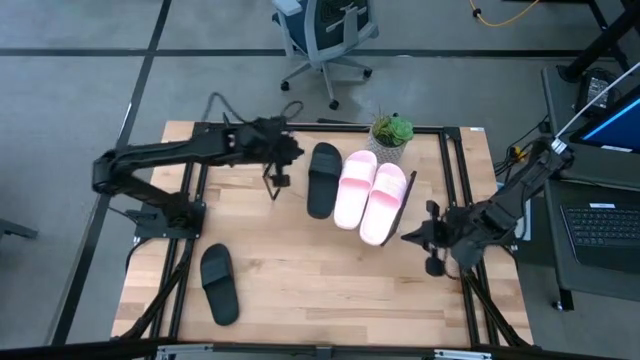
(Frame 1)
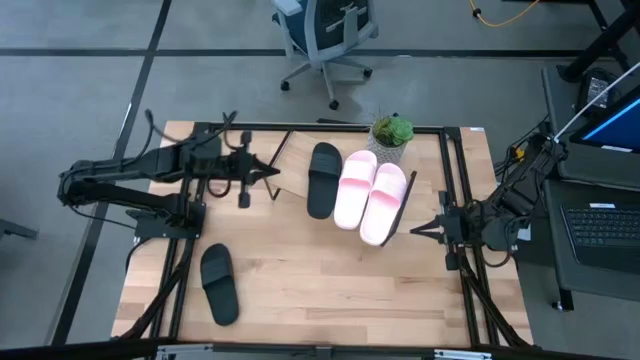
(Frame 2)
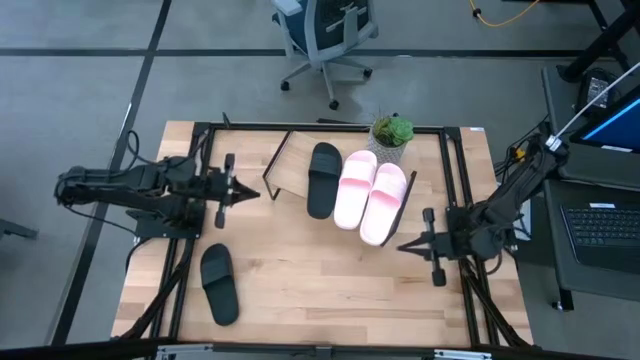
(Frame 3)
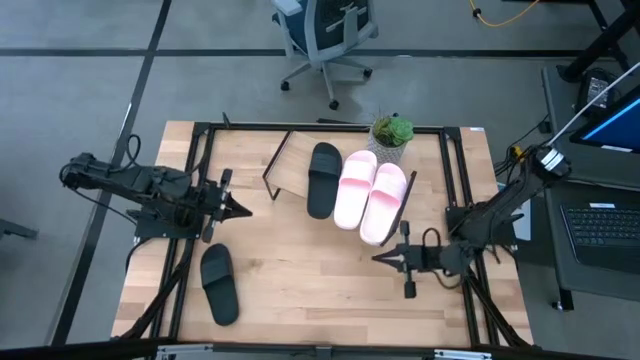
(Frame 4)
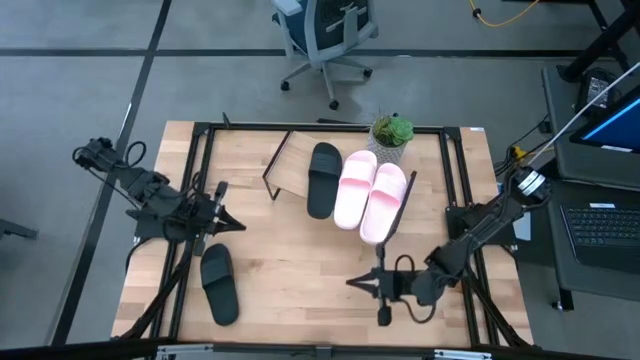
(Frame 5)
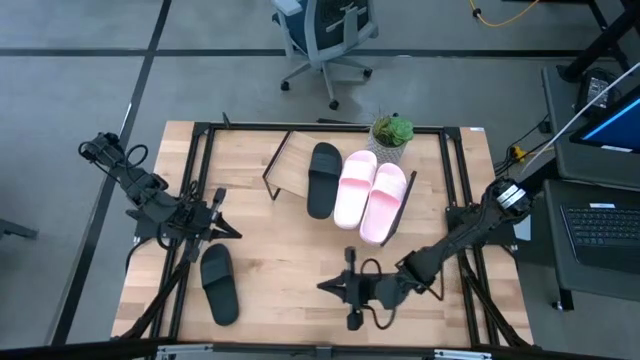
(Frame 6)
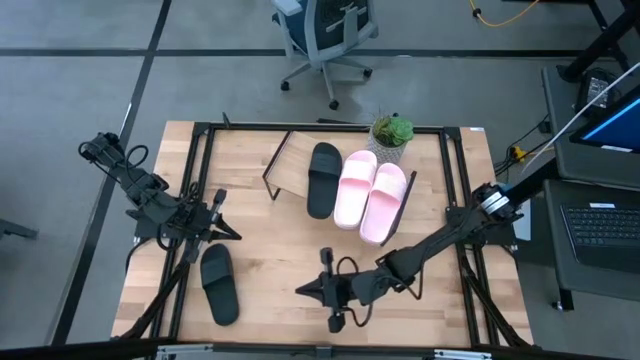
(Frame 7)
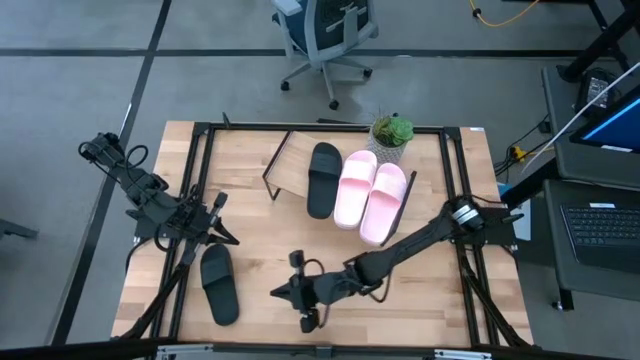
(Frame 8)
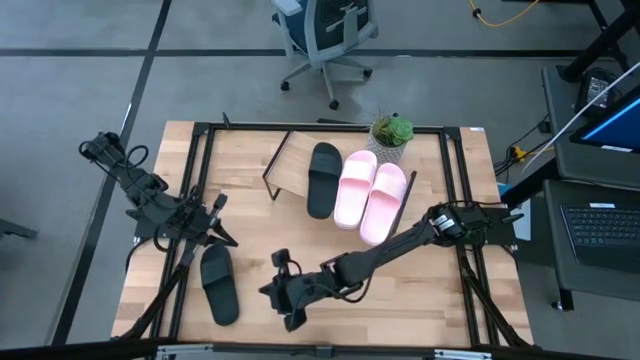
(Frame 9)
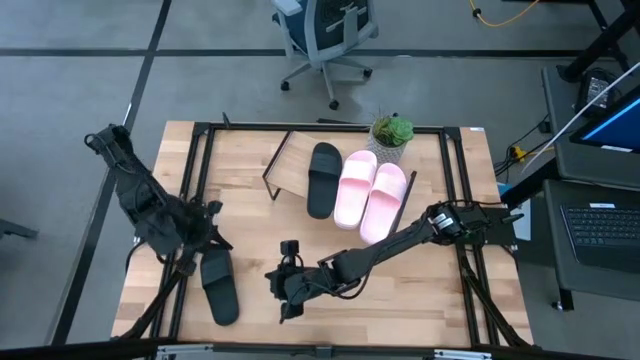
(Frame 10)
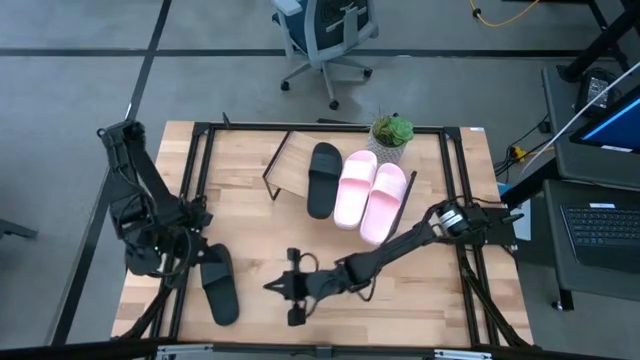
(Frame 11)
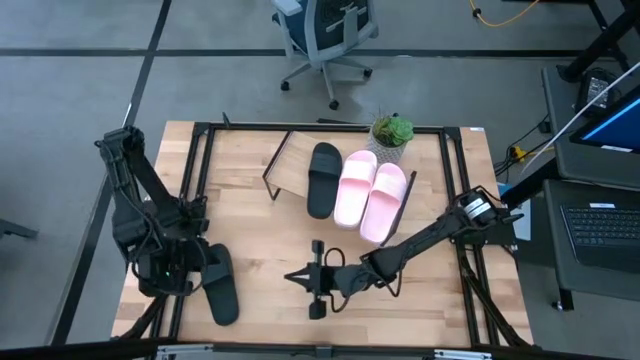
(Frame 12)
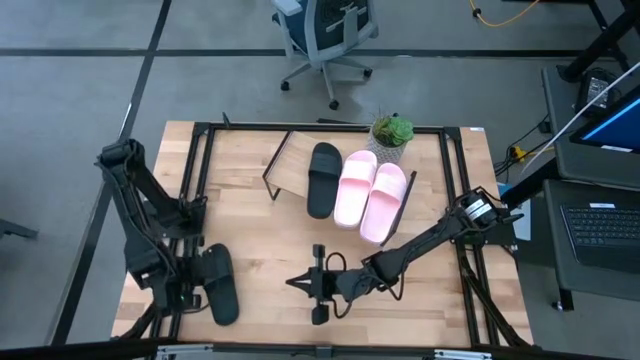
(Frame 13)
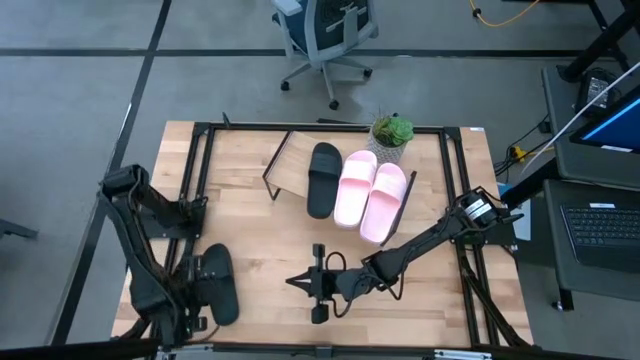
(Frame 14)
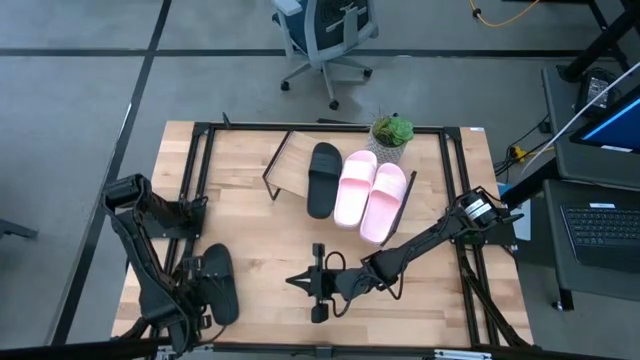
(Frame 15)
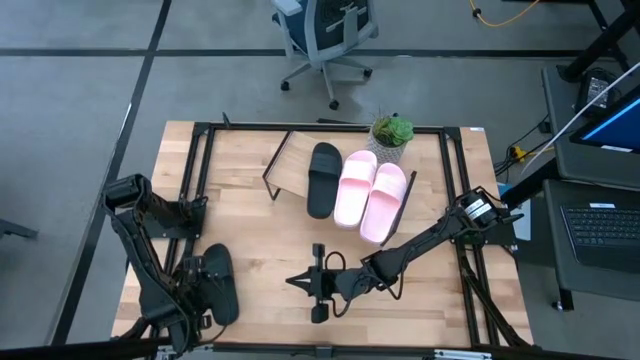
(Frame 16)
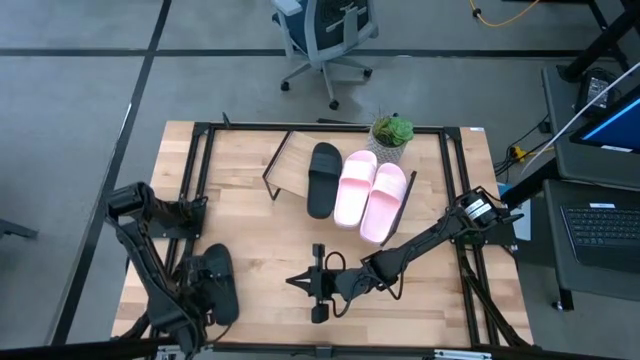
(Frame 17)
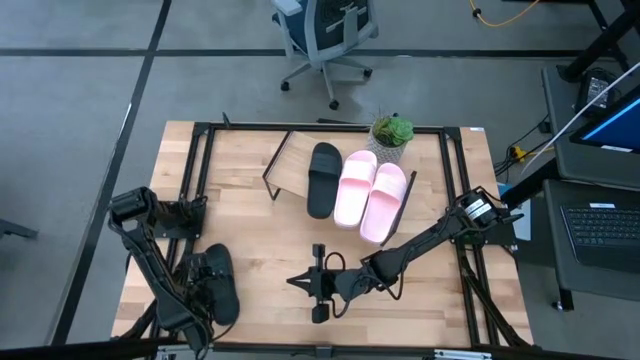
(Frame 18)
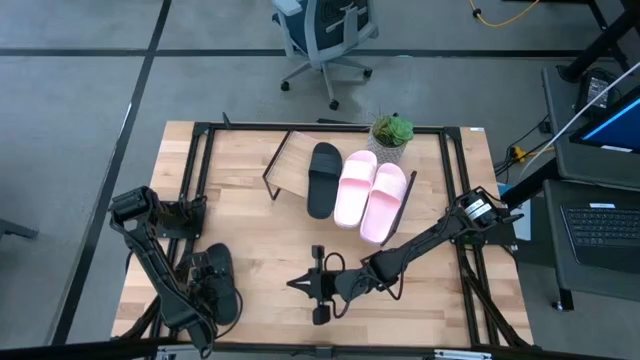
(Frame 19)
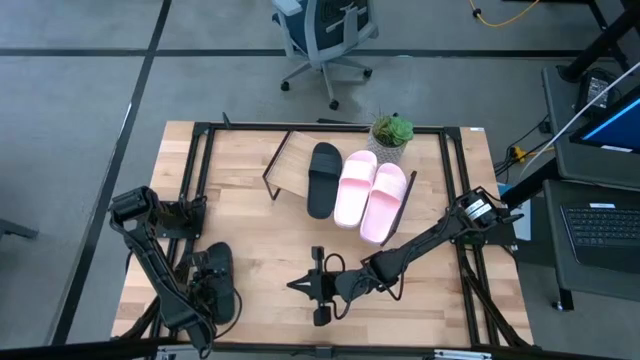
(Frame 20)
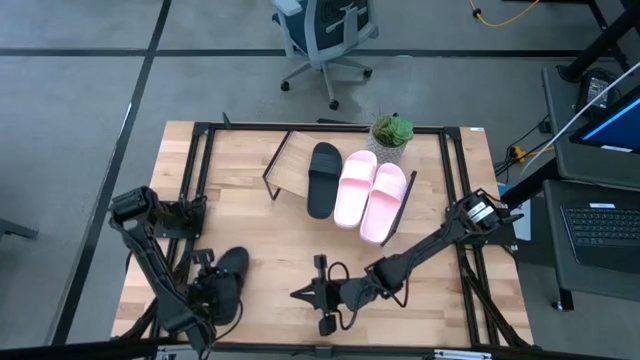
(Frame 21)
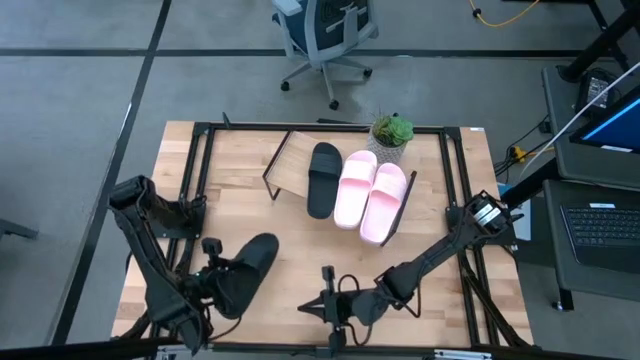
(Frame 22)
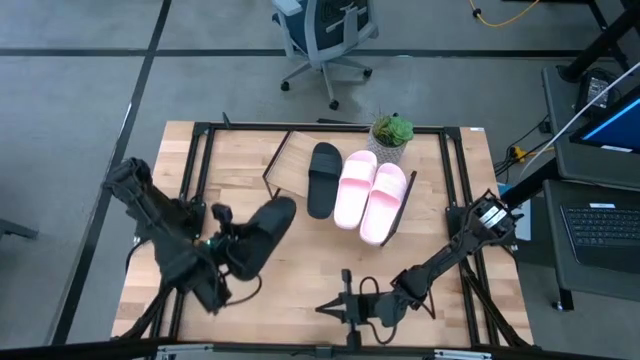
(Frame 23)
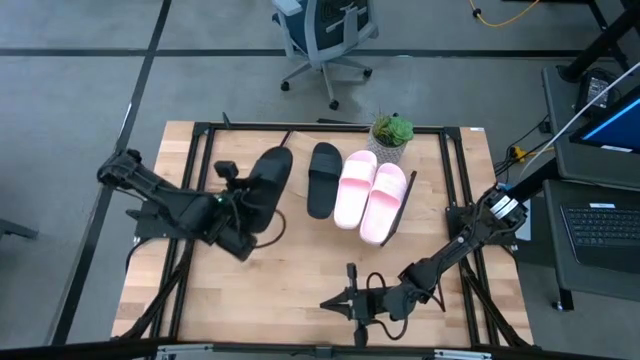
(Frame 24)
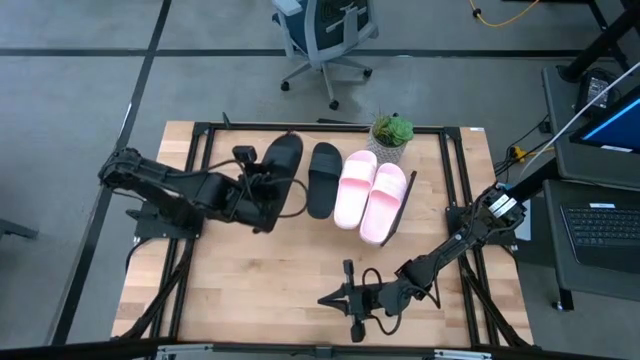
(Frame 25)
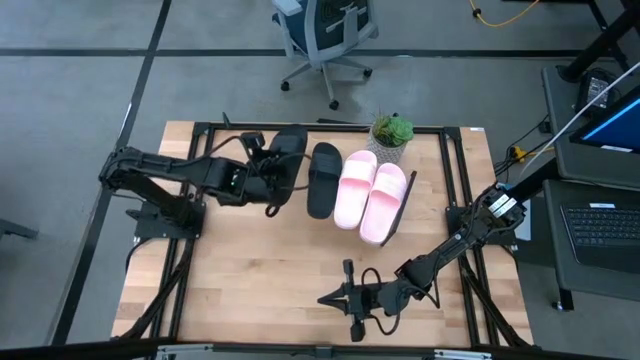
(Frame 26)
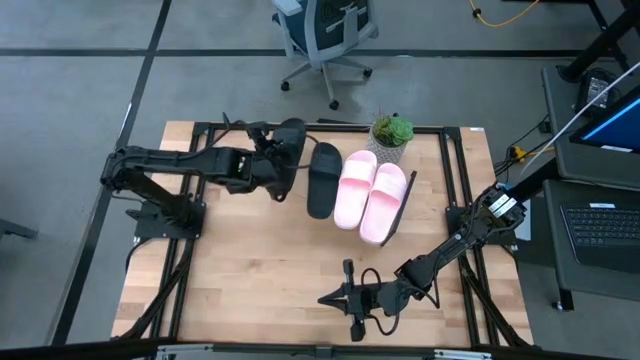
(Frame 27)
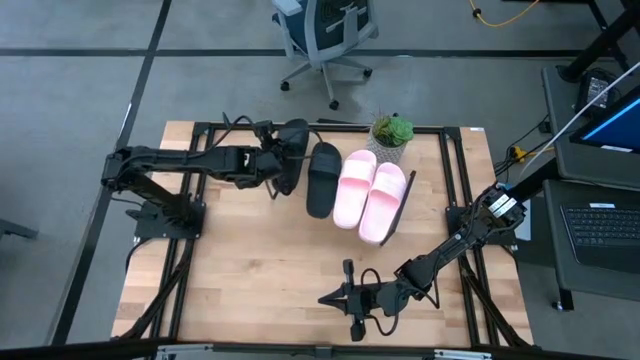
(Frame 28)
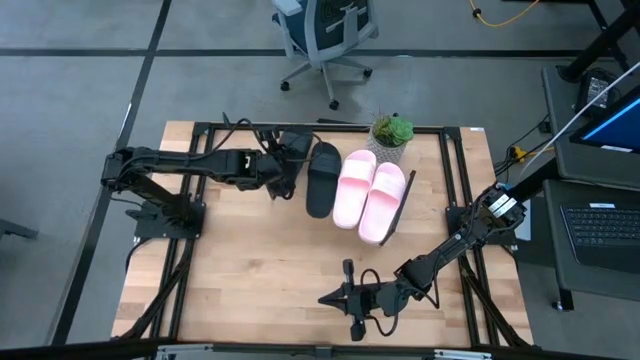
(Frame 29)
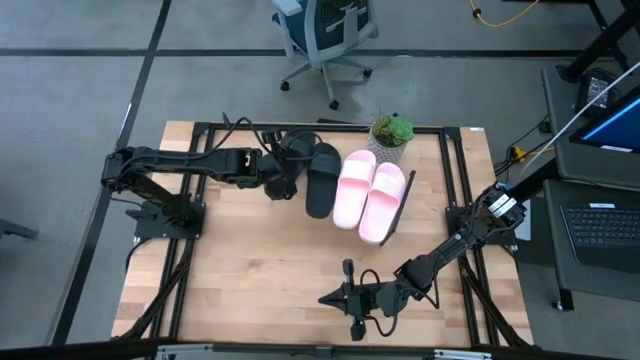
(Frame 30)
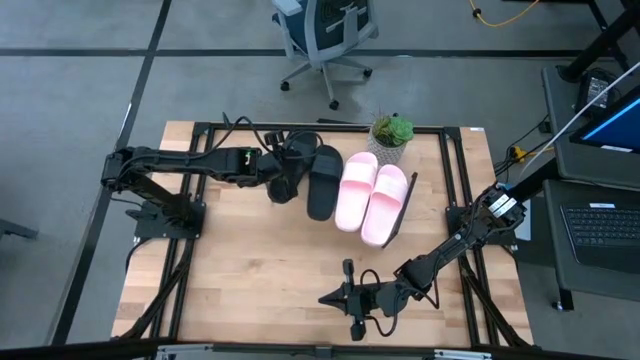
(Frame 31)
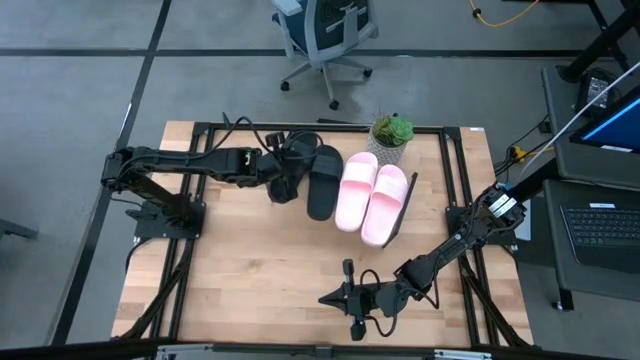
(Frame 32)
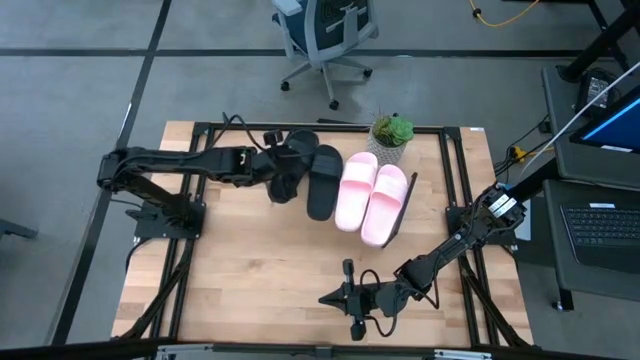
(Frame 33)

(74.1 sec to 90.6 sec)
Task: Pick and place slides into the shelf
Put the black slide on the shelf

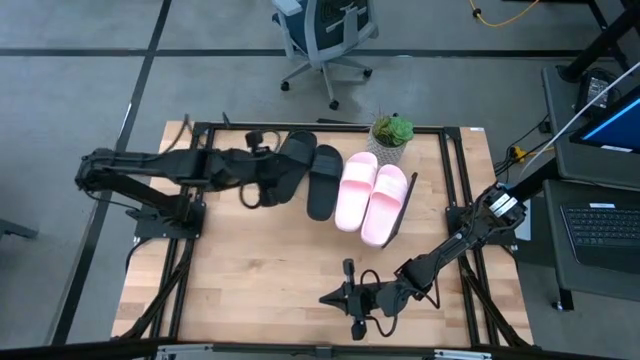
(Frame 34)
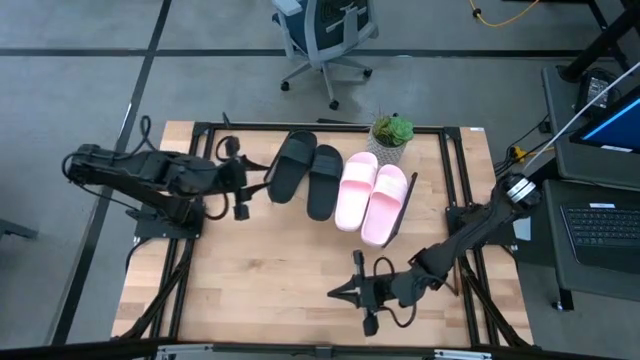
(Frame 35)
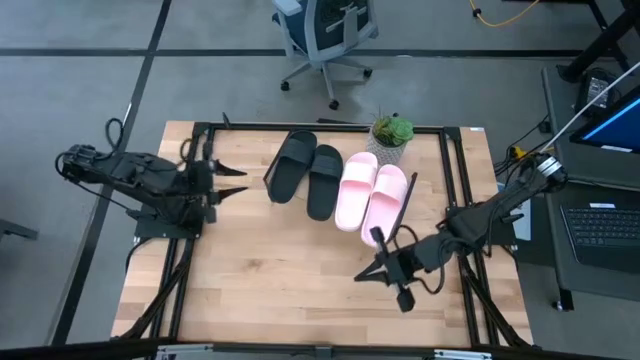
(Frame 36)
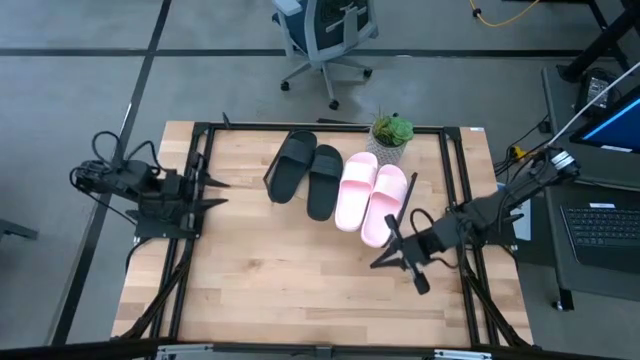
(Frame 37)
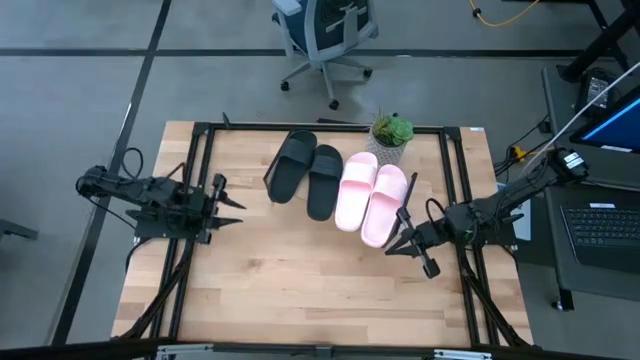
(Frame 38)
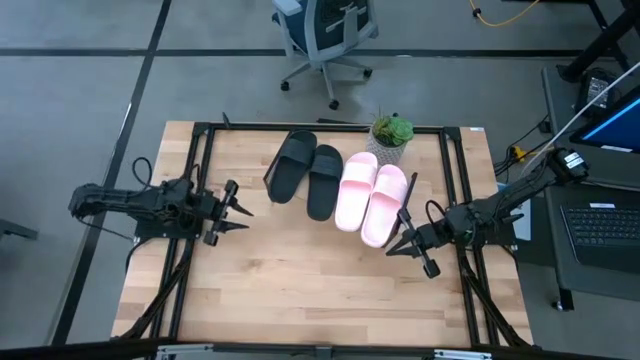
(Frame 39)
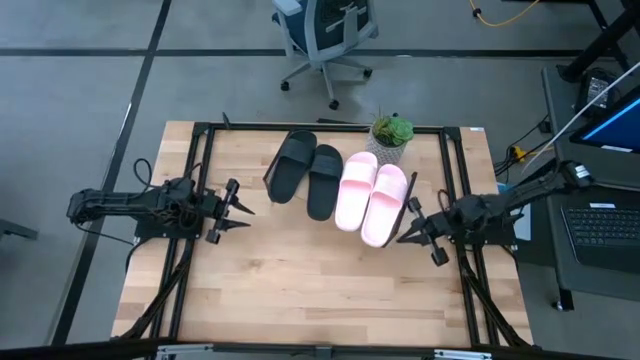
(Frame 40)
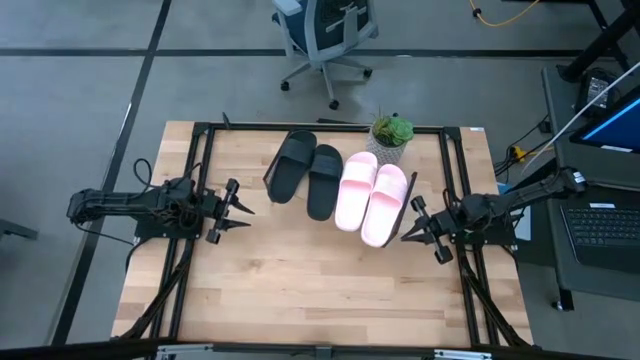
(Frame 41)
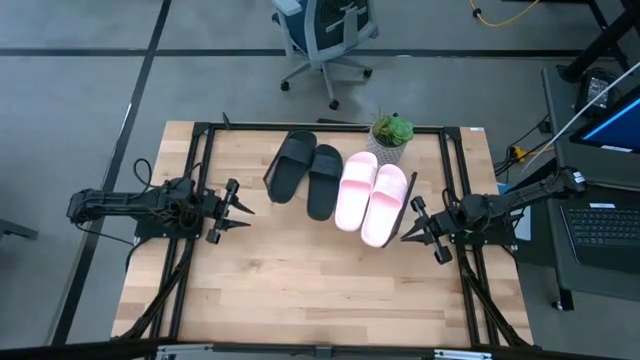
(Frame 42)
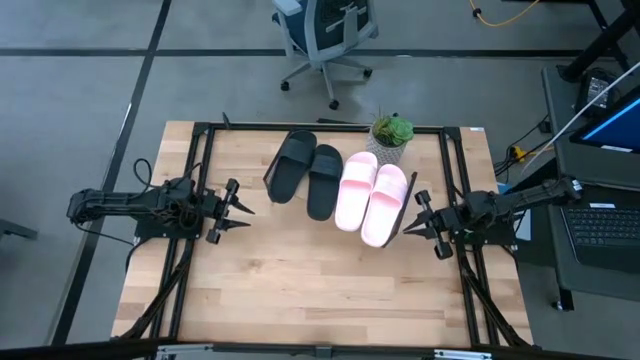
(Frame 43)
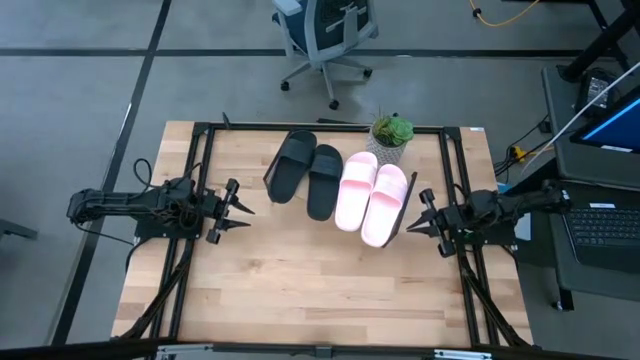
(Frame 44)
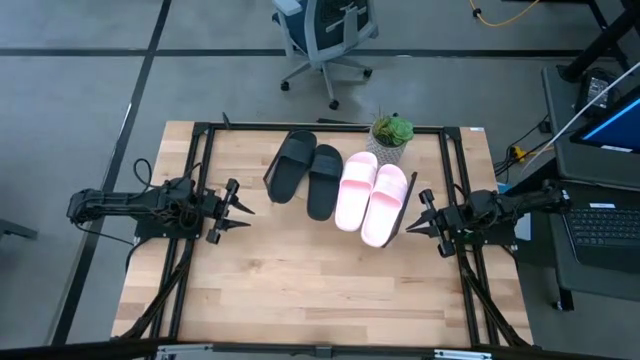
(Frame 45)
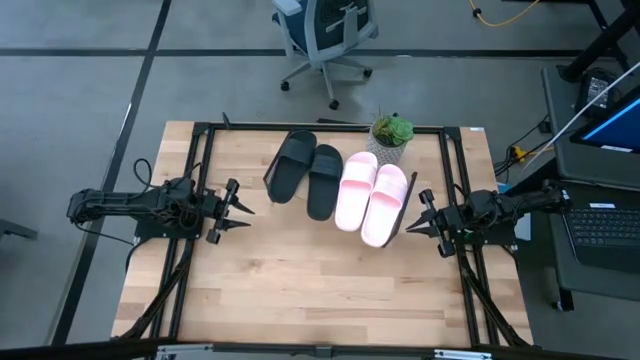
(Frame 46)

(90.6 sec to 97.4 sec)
Return to Home Position
